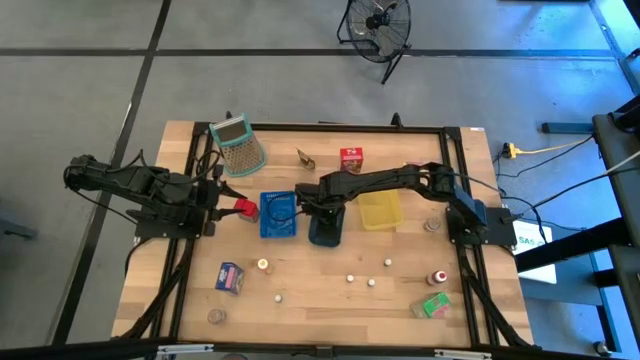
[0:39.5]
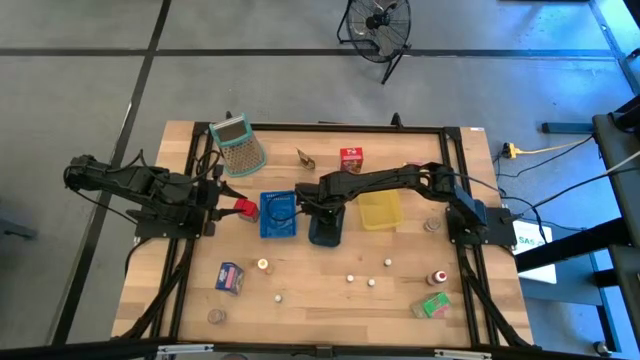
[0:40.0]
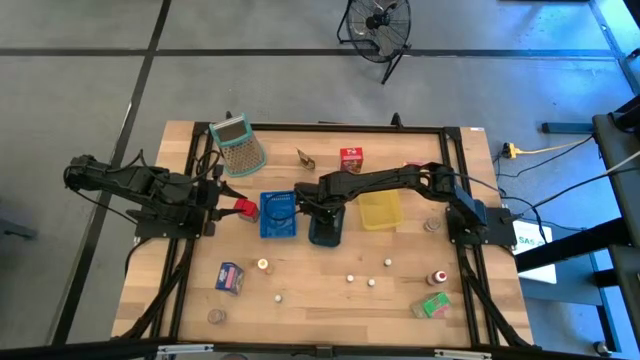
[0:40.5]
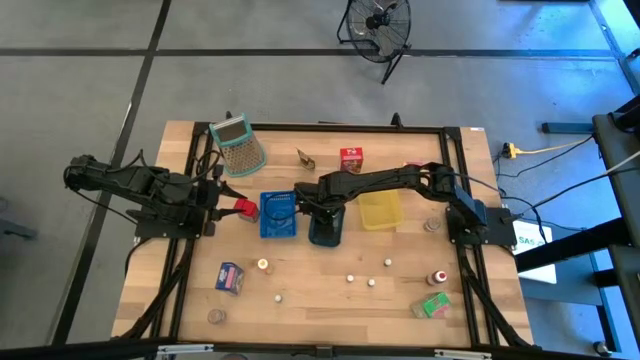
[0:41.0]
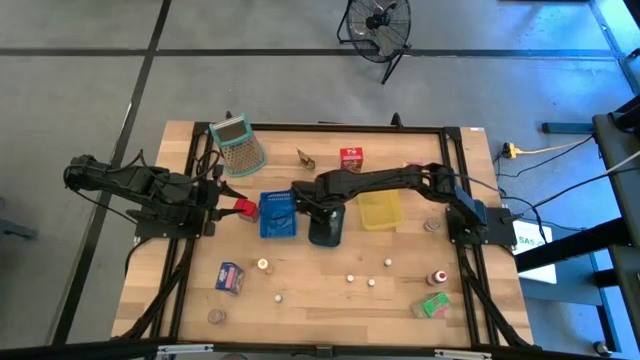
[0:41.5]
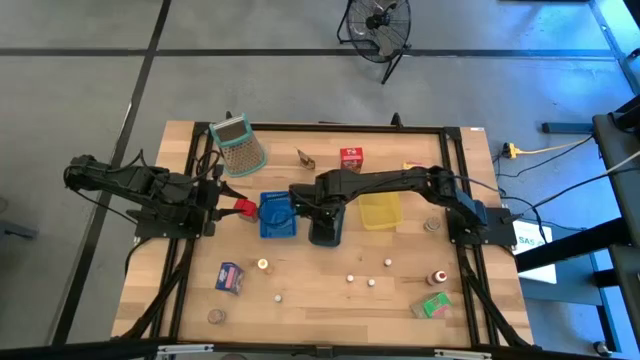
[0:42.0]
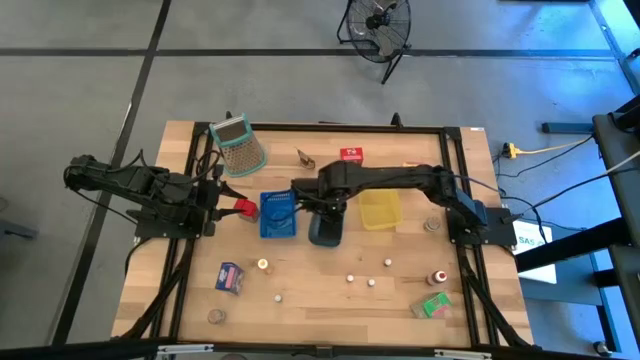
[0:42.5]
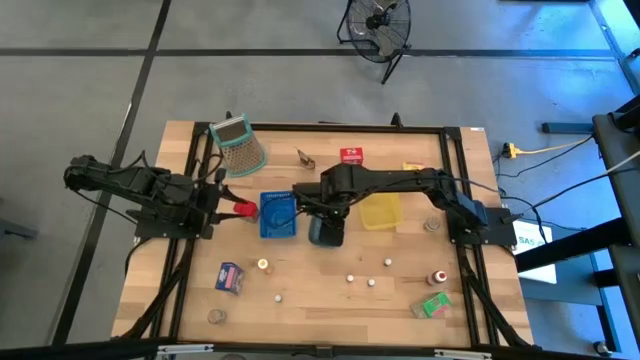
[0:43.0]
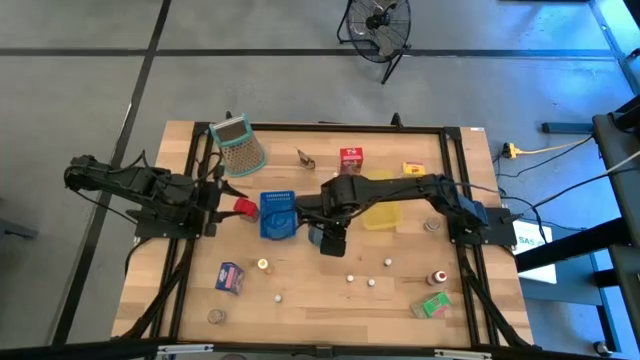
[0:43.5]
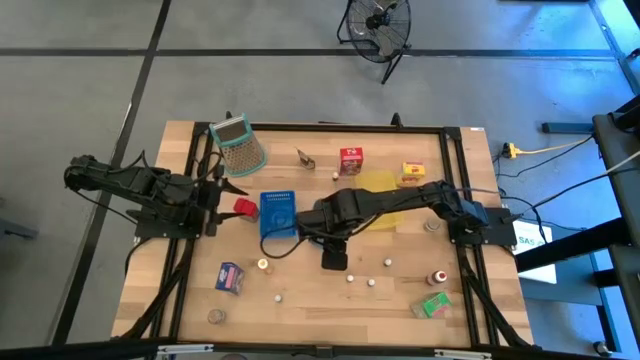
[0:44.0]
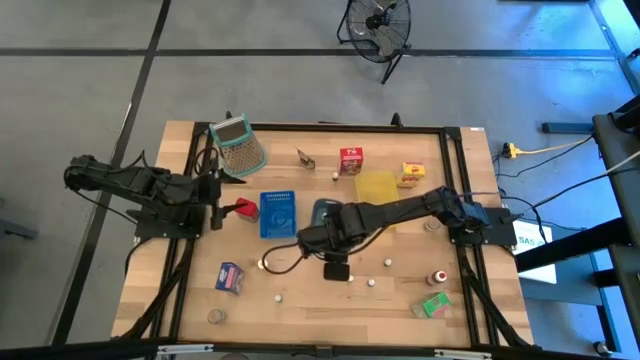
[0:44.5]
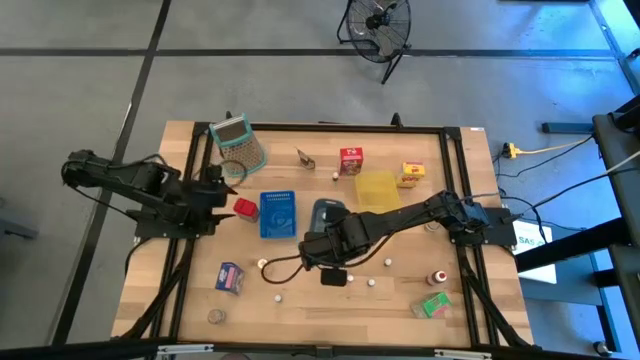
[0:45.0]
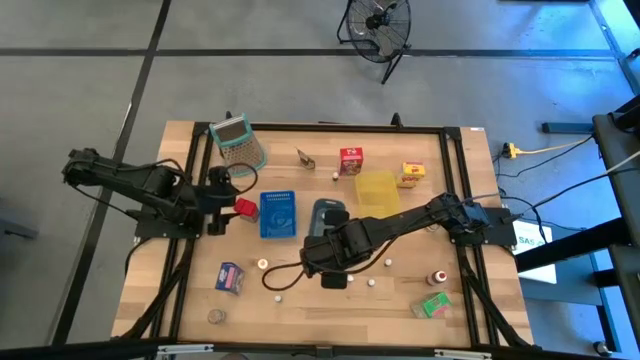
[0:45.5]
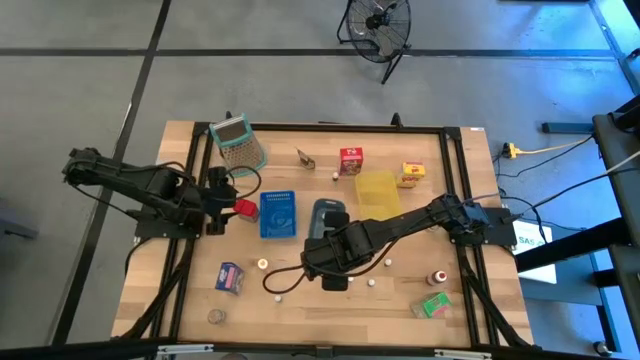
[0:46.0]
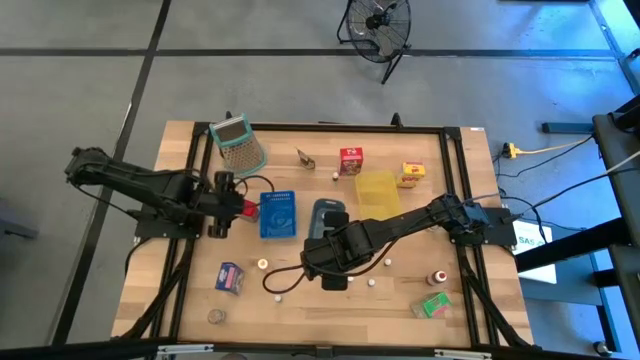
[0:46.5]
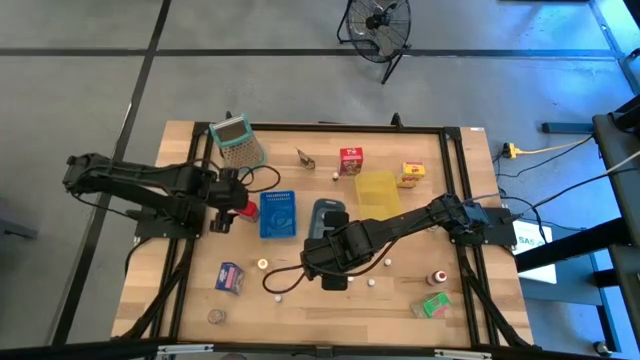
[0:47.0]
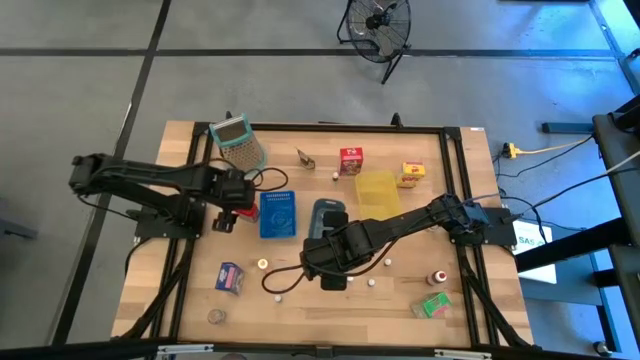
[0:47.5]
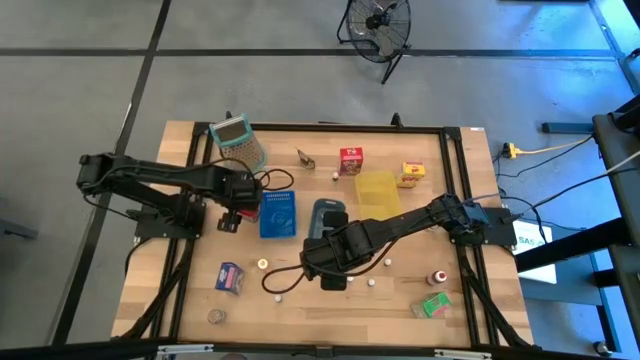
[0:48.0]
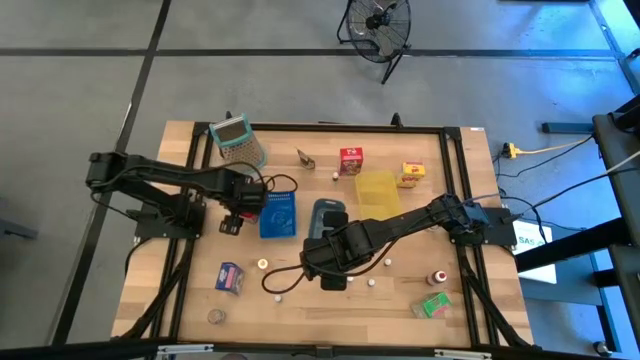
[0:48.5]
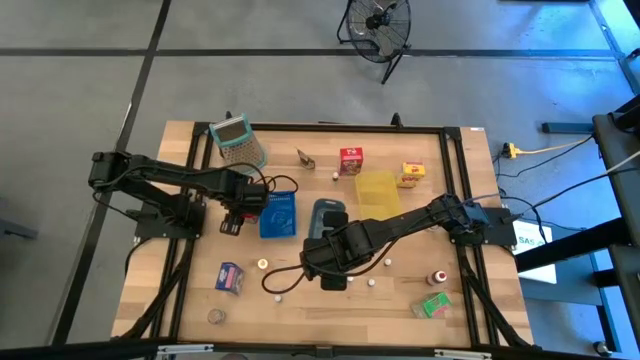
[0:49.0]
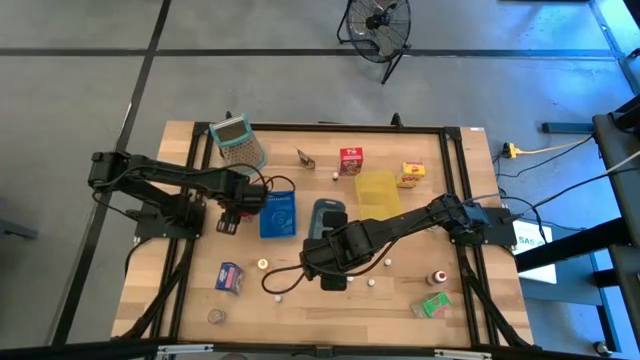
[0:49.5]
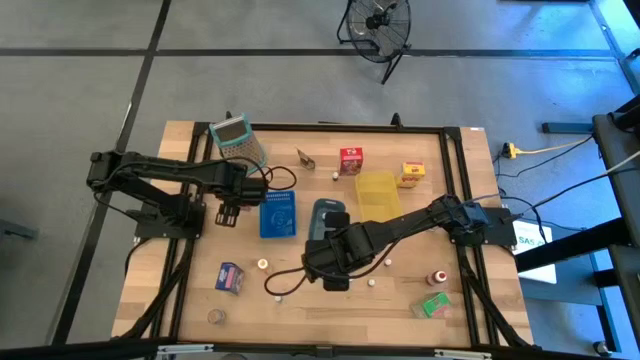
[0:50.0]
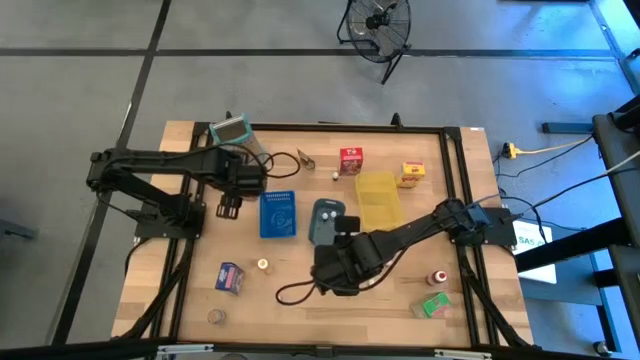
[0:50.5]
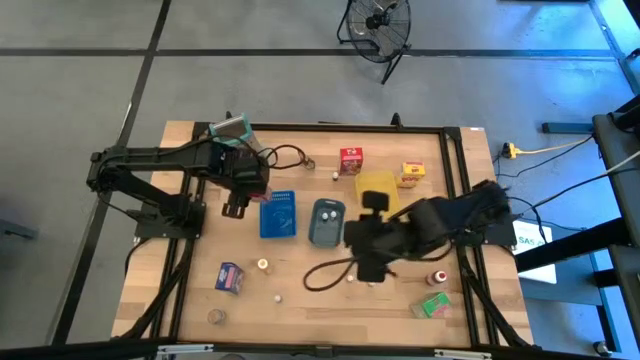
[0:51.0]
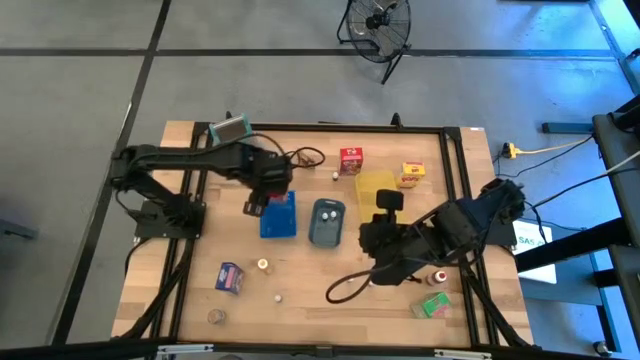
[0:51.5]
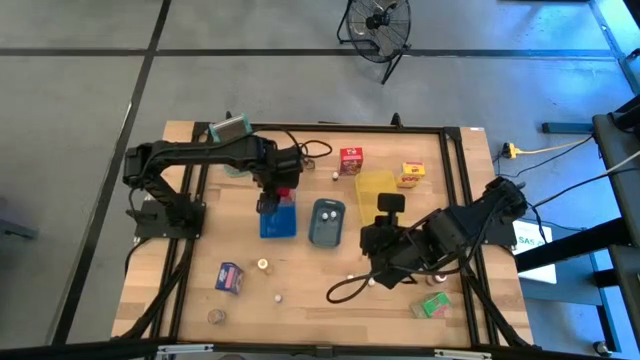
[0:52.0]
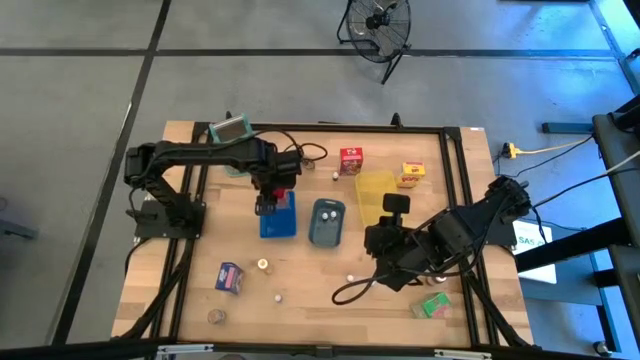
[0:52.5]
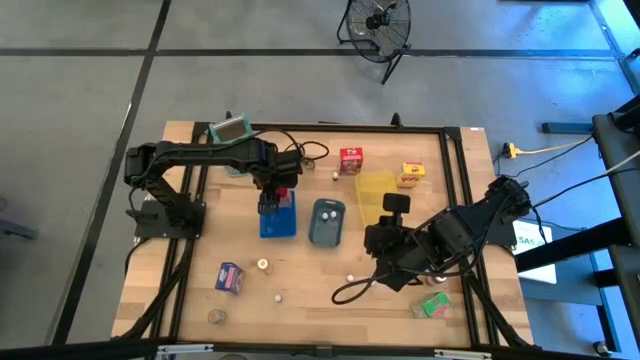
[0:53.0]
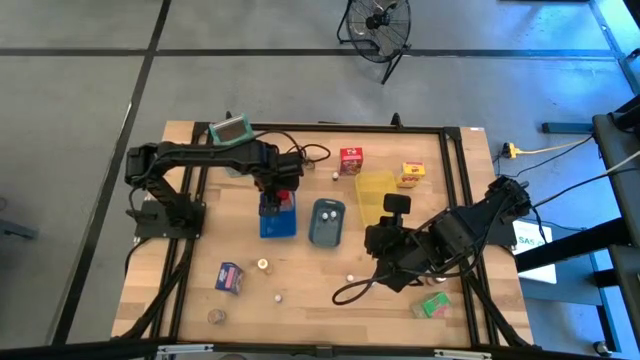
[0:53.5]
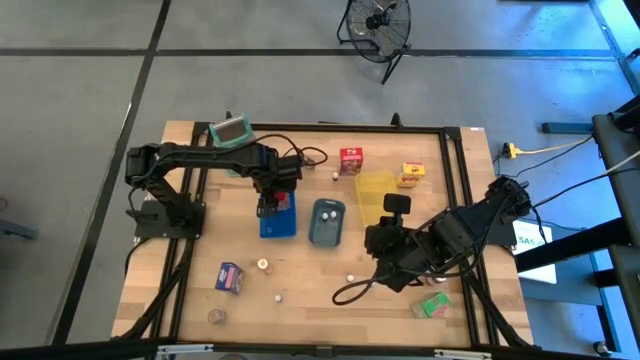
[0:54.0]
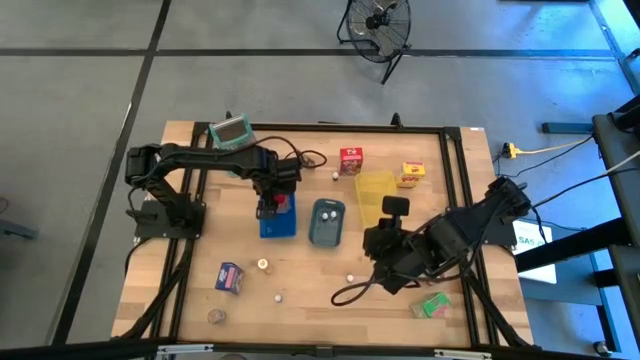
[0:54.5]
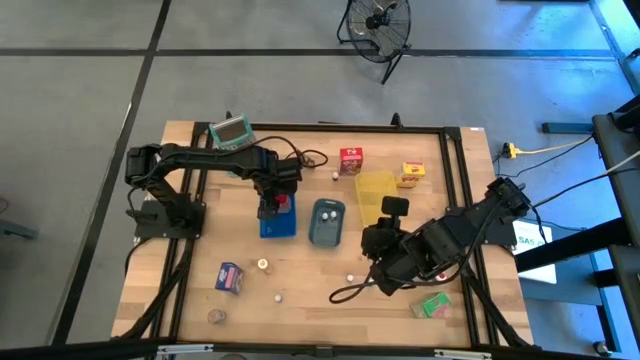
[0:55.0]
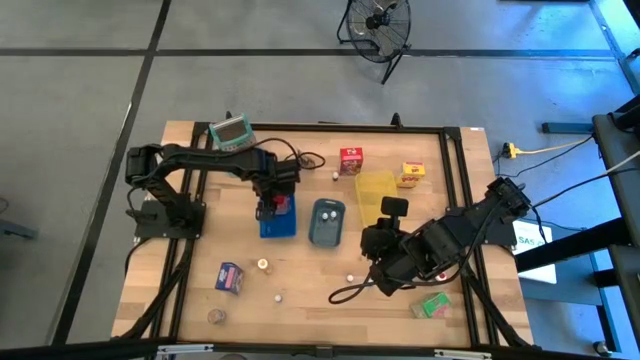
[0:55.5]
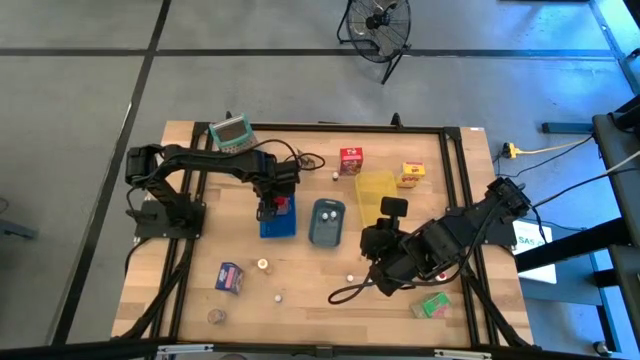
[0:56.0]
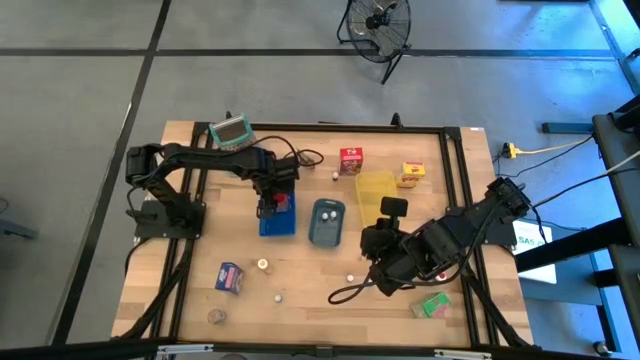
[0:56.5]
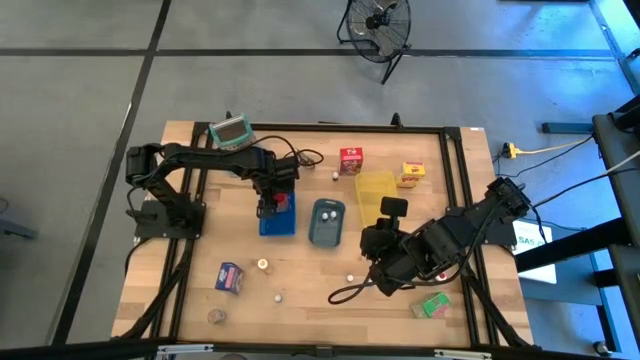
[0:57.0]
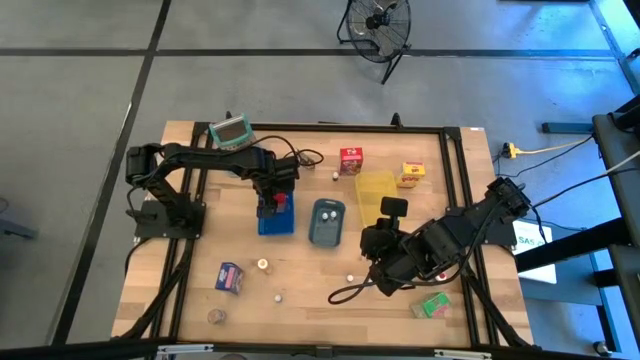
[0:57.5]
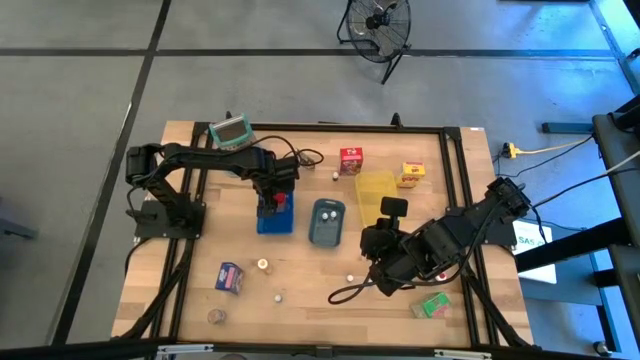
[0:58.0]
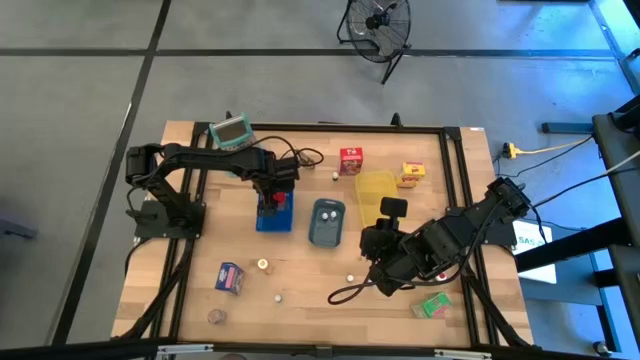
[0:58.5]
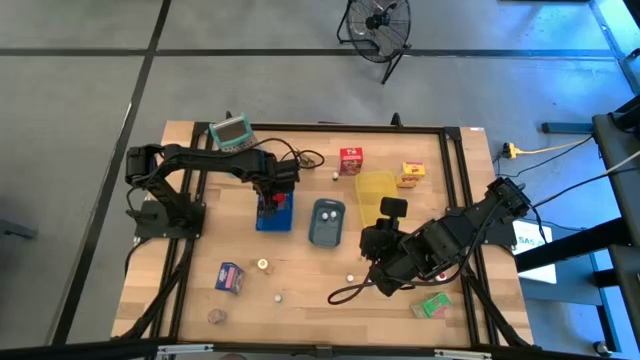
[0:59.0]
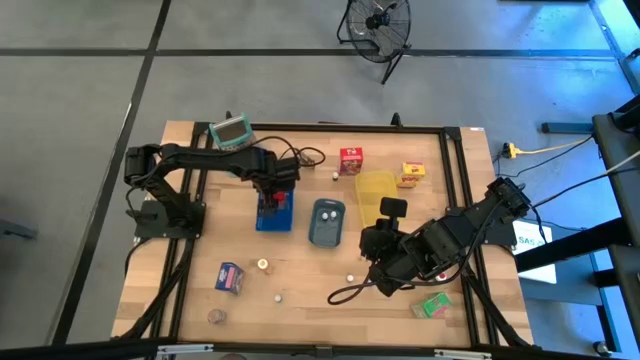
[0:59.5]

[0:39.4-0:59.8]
Task: Pick & Place Kitchen Items
Put the red seasoning can into the blue bin

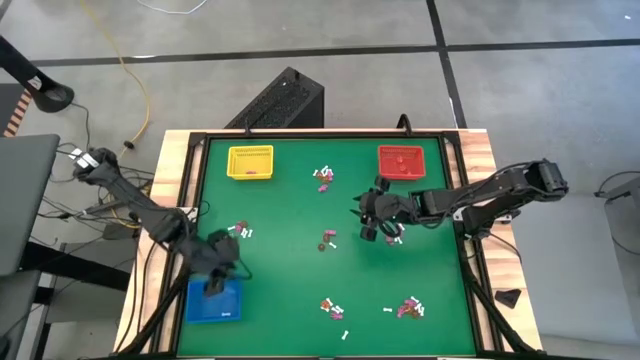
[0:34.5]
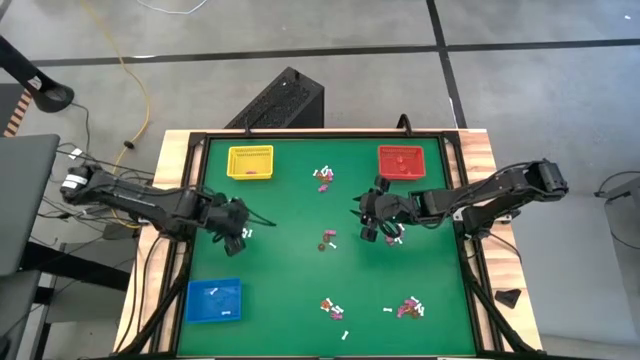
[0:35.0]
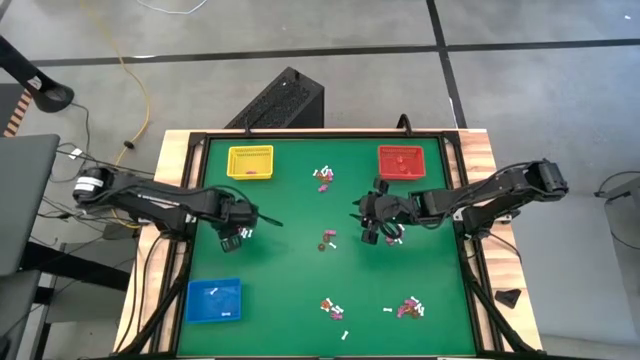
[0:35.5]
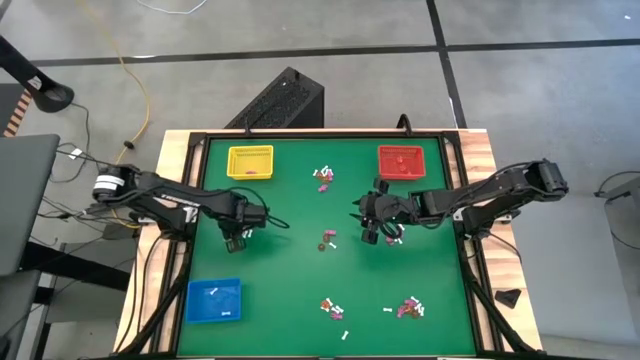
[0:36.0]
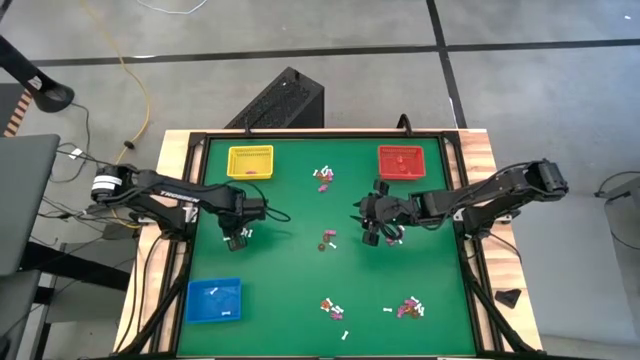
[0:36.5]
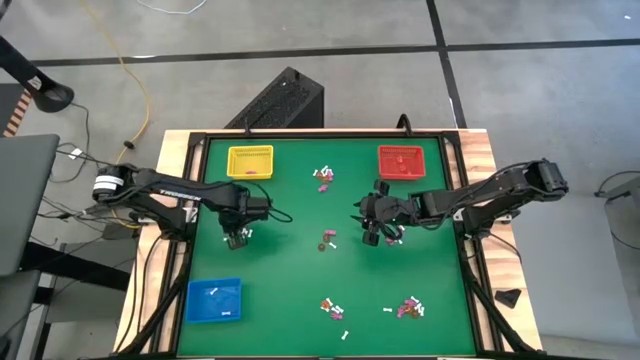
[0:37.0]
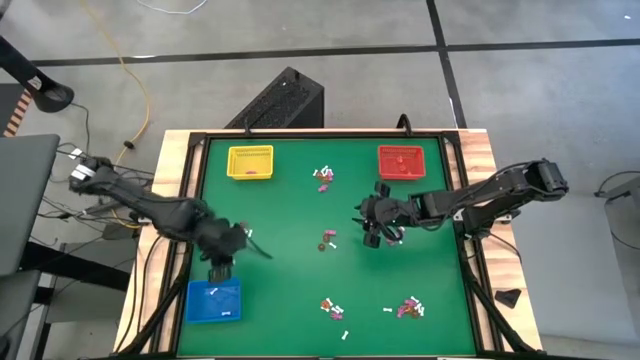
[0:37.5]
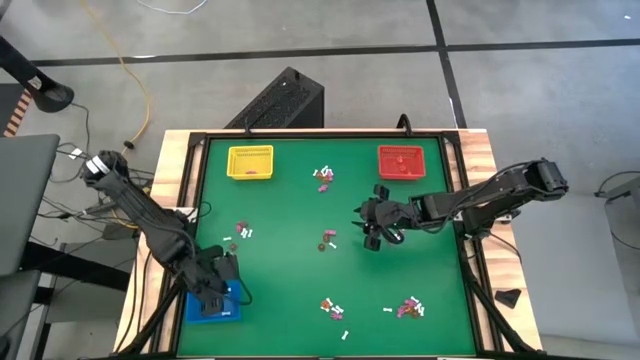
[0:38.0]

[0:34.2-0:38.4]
Task: Sort Halloween decoration
Put the white bone toy into the blue bin
